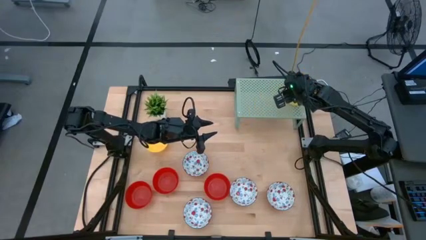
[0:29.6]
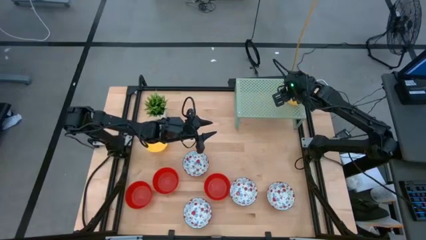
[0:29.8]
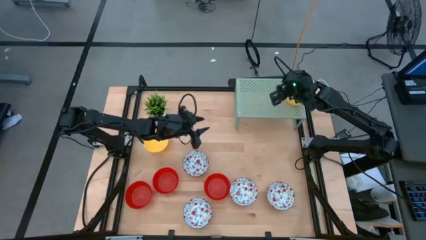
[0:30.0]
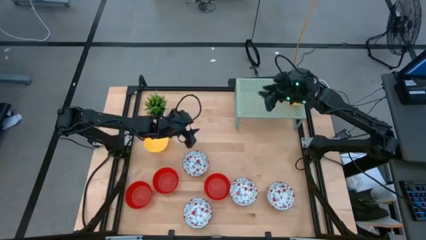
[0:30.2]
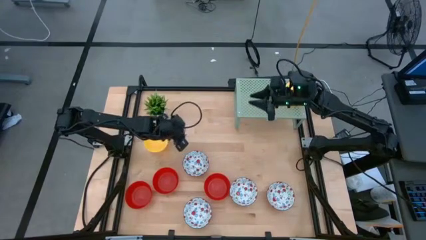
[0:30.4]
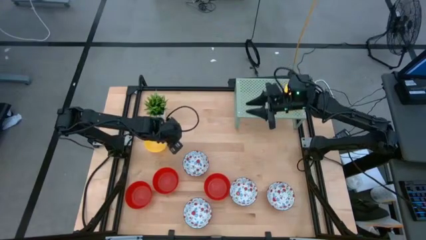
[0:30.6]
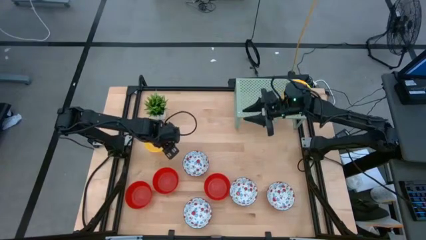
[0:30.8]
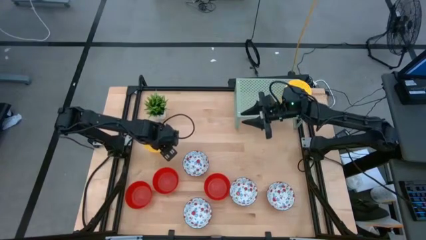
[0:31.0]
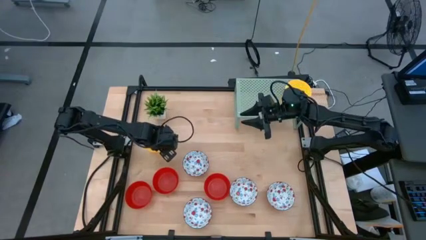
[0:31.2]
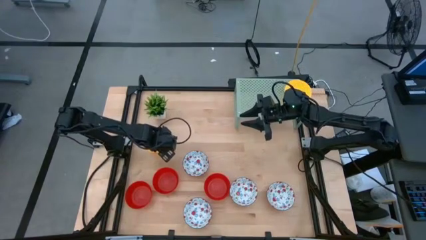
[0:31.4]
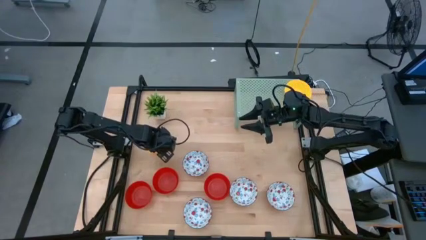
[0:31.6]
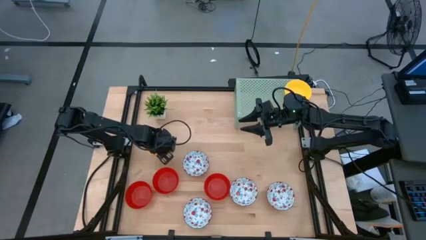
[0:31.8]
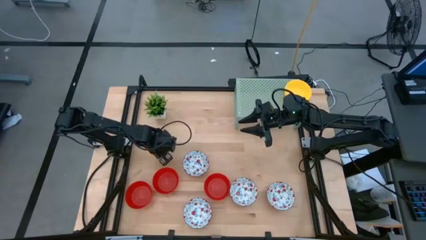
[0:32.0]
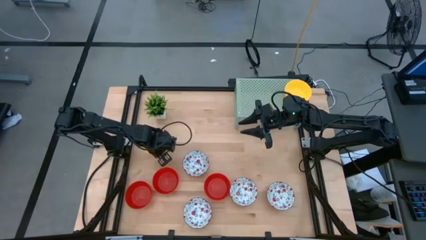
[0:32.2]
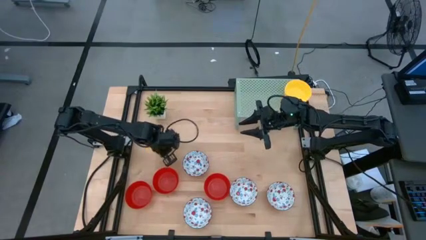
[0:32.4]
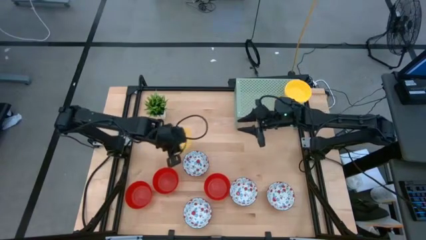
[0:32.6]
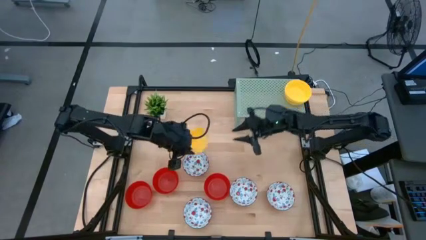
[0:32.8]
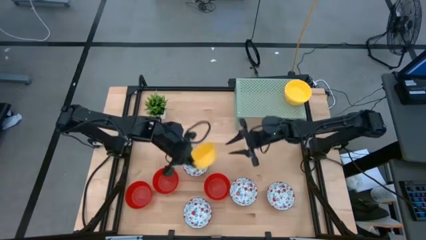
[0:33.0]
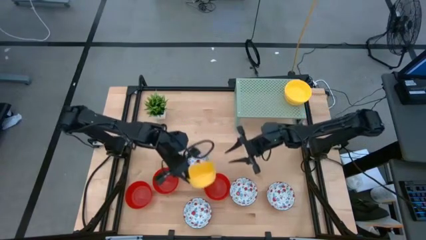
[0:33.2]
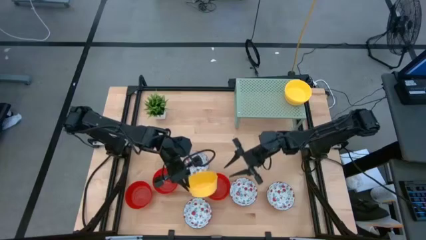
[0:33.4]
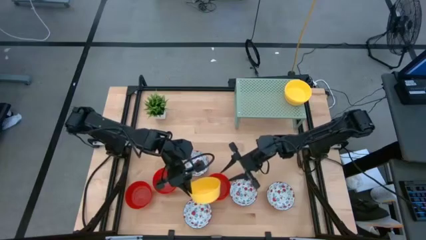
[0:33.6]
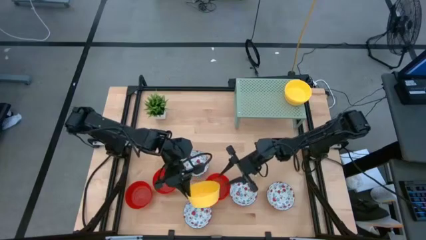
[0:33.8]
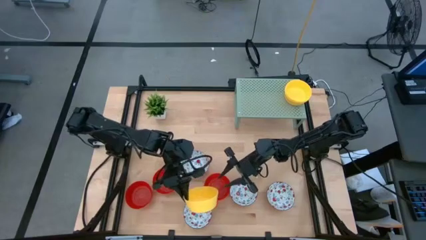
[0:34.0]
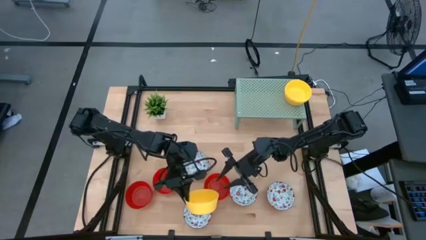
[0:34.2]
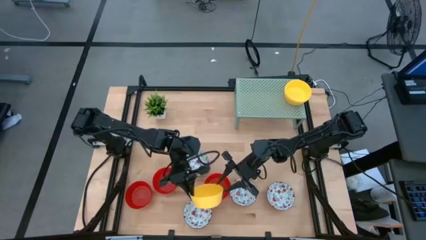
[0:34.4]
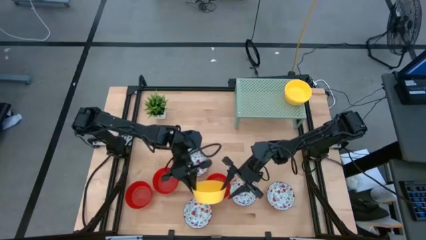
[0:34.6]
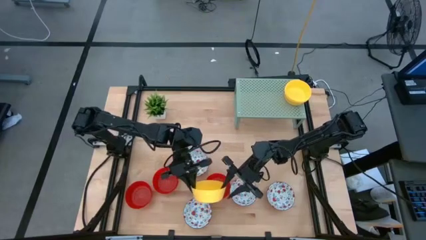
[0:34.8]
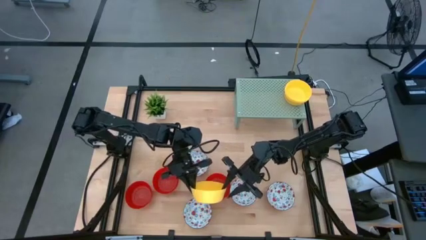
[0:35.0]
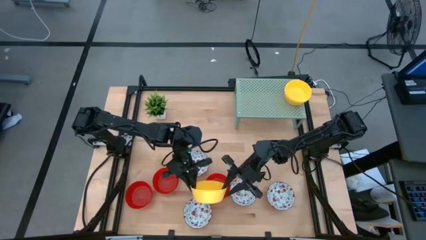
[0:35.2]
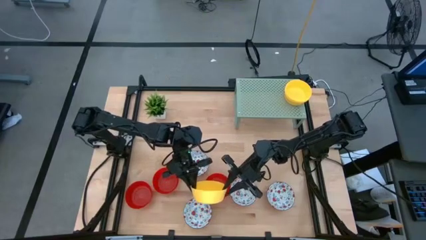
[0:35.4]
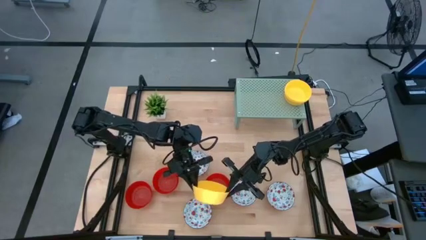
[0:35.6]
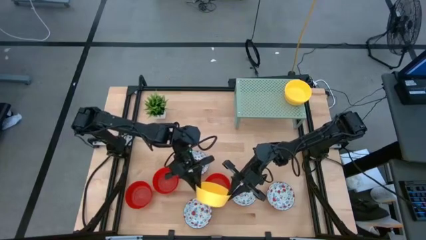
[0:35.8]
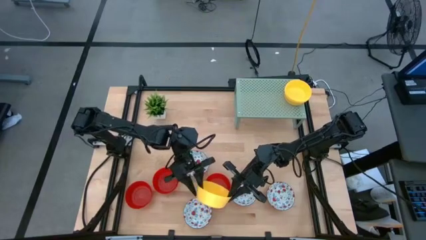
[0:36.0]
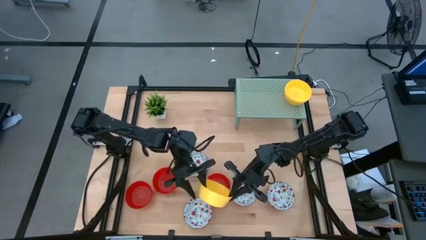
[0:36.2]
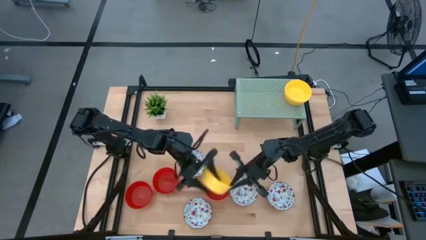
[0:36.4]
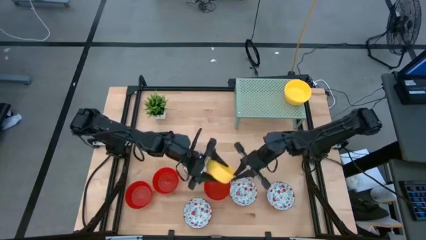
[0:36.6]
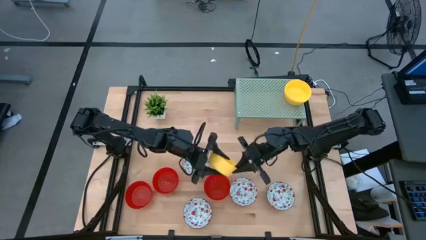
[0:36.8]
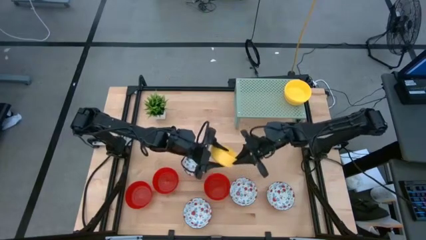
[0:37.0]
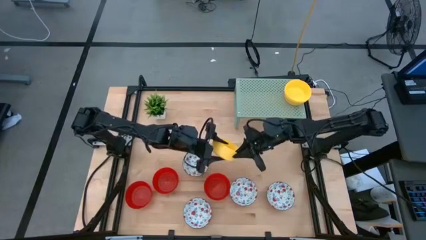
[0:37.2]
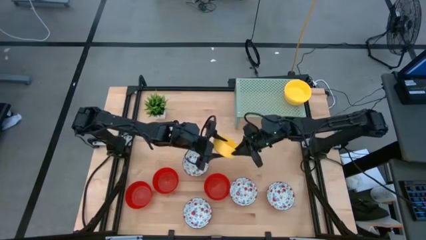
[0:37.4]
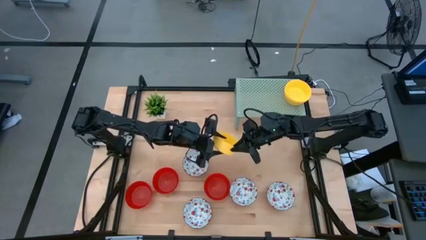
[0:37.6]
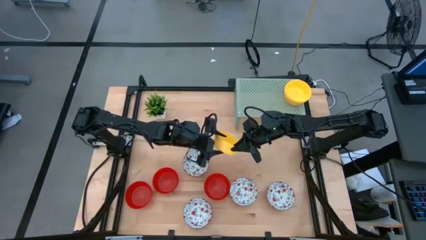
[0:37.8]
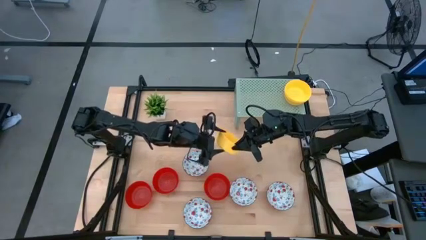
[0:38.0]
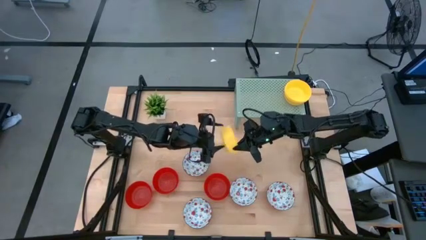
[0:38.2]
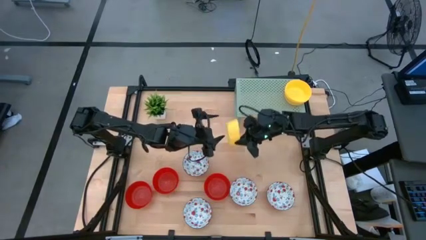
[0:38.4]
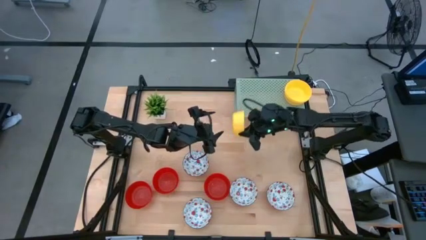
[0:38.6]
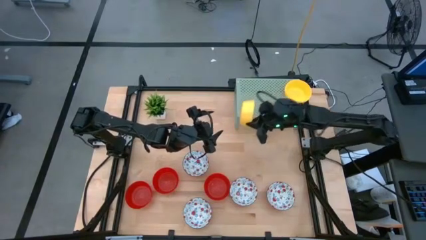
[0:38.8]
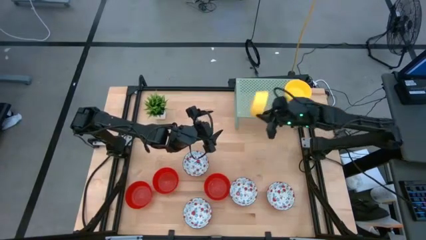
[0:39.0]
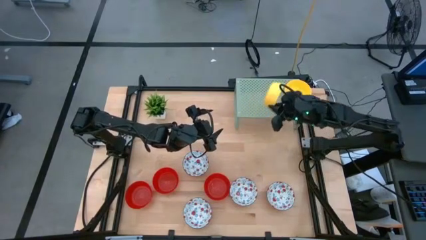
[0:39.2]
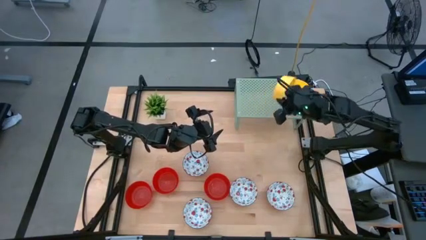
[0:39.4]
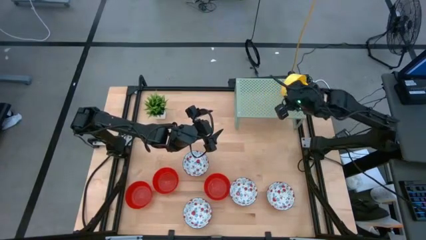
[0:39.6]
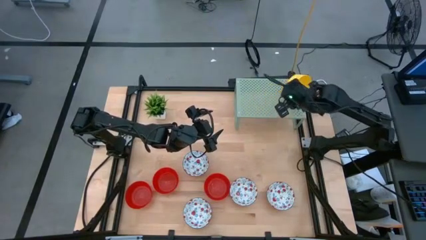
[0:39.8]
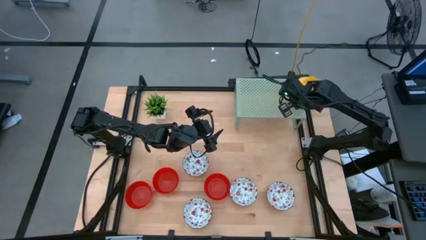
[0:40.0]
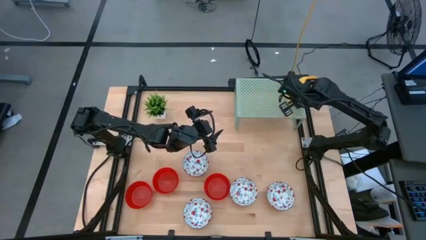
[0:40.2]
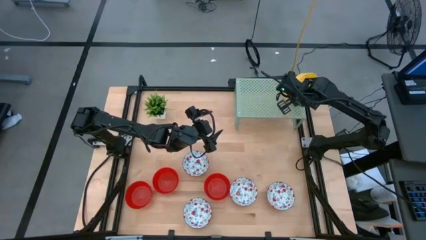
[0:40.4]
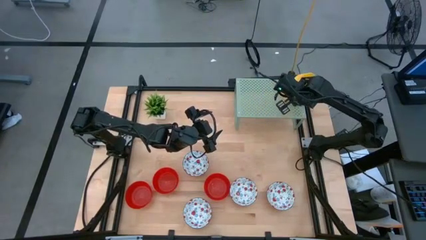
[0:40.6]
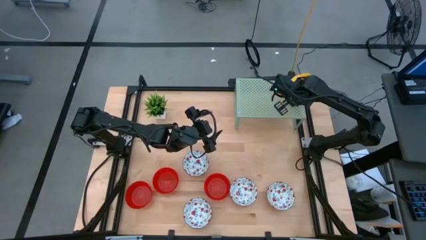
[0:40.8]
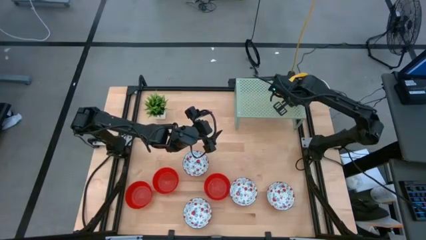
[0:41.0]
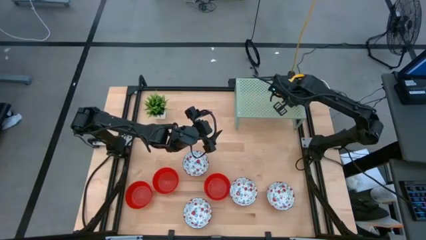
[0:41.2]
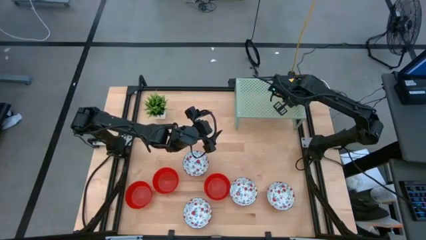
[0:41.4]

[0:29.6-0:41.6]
Task: Pick & Place Mini bowls
Stack the yellow bowl on the stacked yellow bowl on the shelf

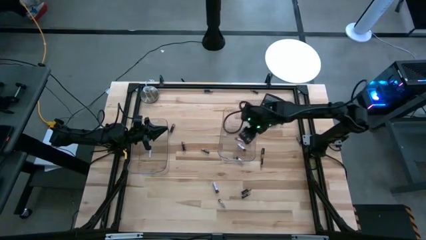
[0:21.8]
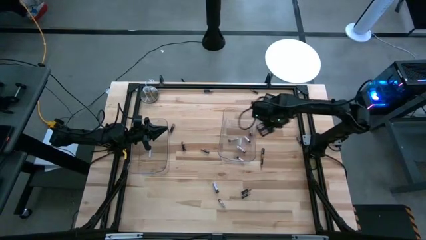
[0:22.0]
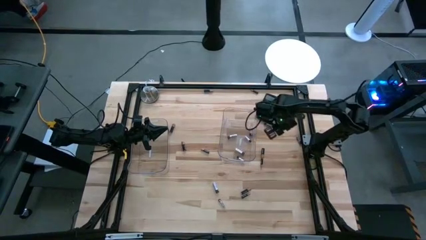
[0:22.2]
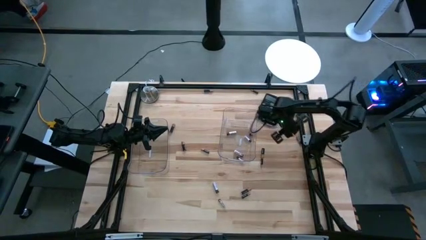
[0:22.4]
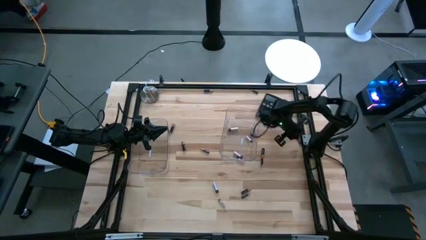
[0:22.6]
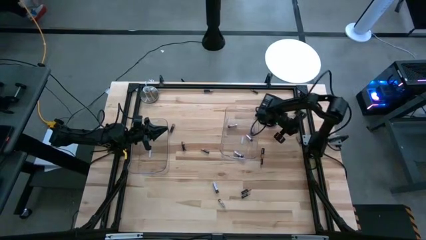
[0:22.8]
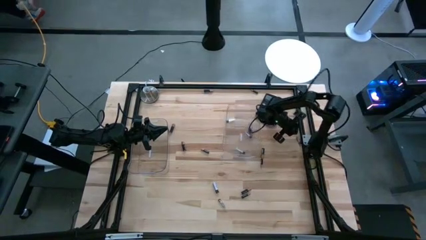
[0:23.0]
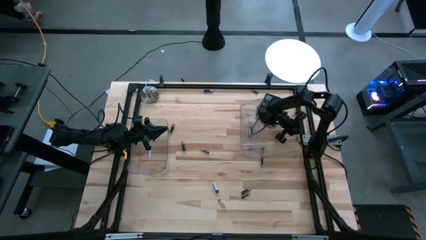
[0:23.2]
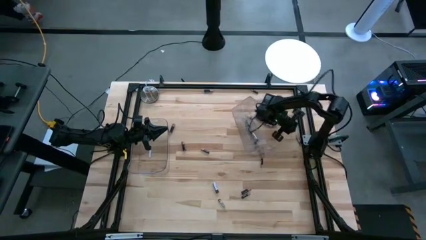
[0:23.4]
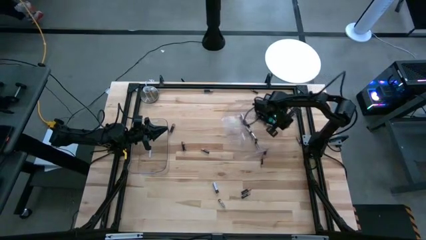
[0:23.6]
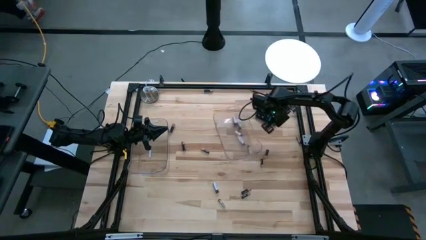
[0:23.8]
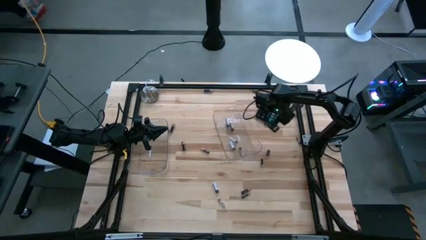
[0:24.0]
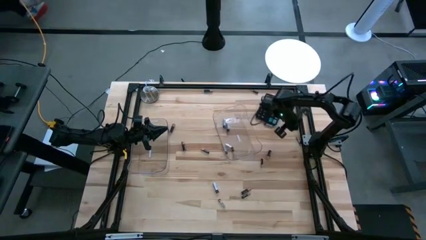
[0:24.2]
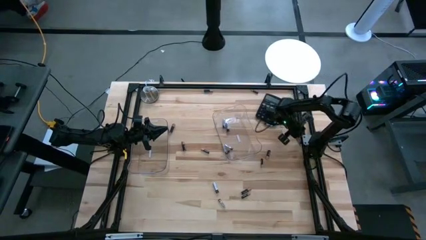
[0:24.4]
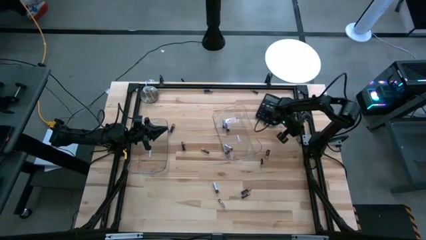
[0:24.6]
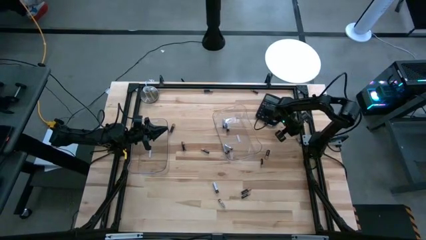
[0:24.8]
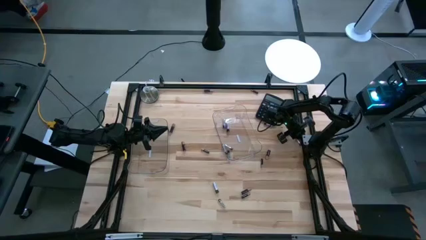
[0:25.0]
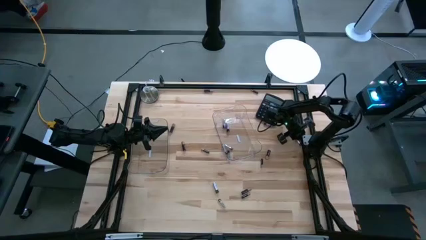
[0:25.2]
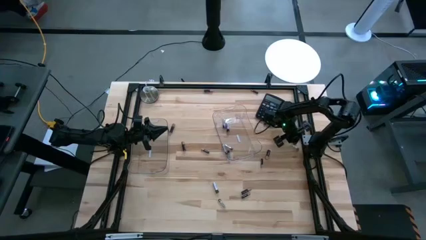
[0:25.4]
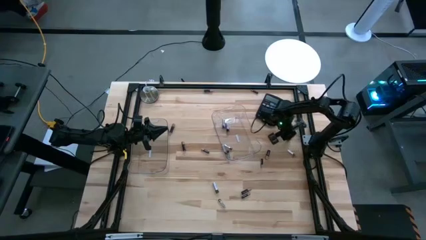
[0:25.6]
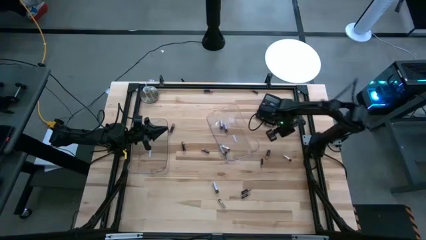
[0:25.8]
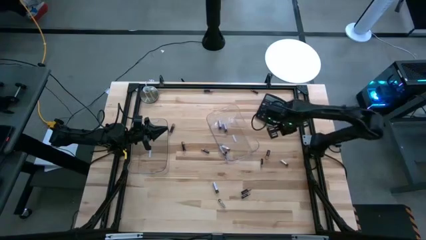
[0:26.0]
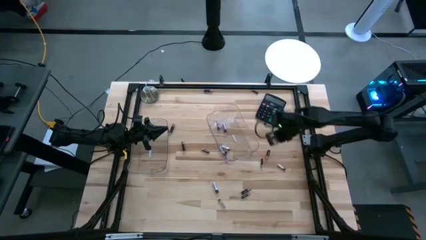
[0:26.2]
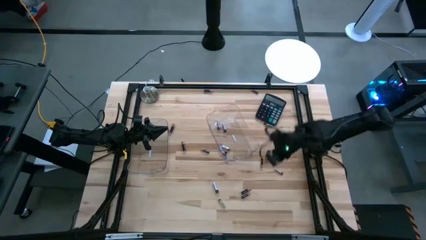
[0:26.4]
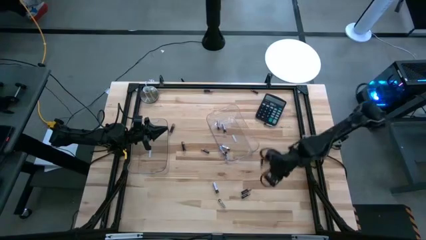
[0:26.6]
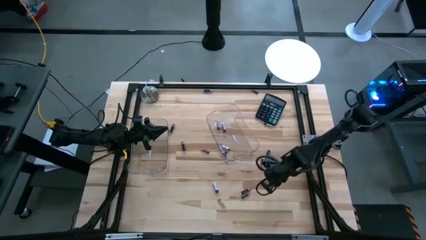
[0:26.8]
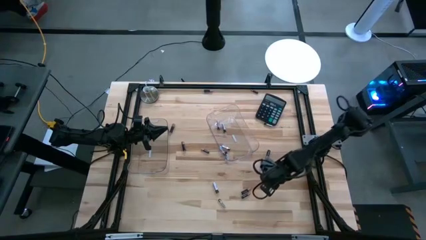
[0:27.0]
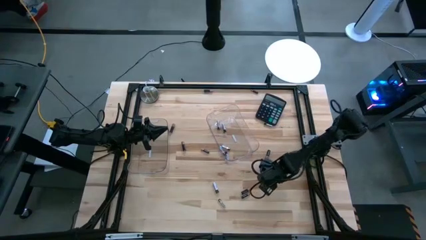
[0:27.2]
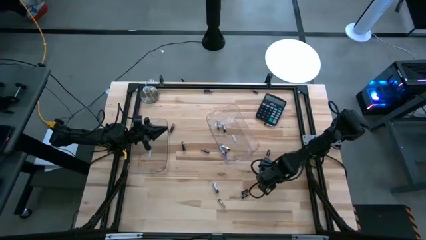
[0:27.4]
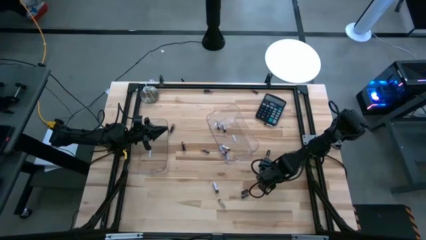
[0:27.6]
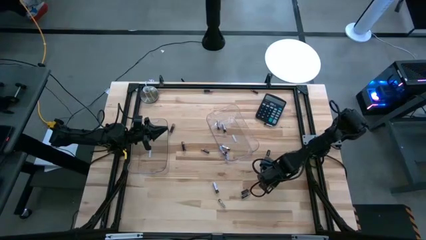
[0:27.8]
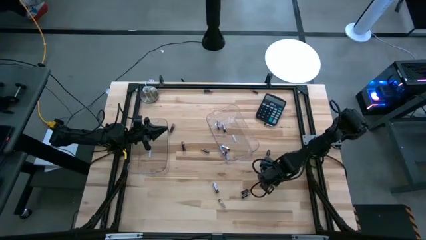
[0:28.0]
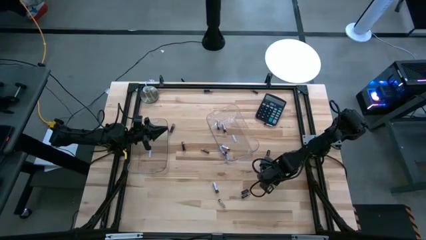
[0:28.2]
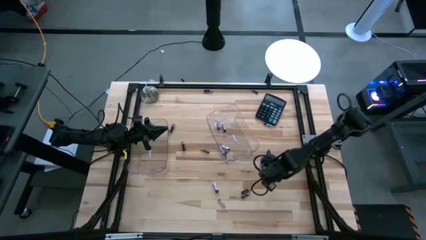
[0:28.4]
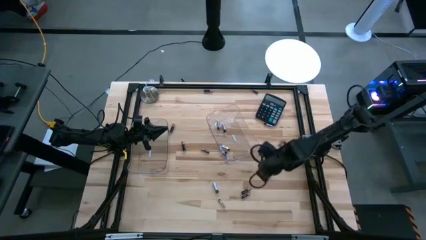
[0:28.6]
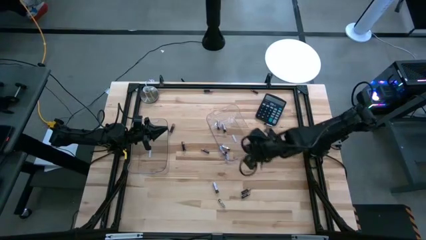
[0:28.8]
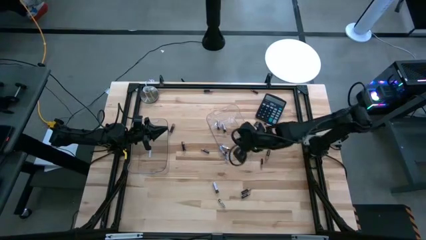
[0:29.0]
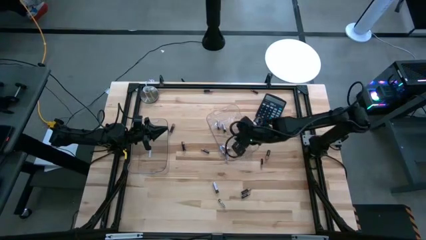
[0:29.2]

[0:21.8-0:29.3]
Task: Sort batteries
Put the silver battery into the right transparent bin
